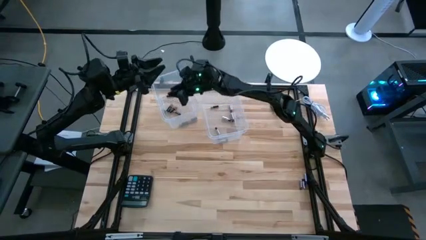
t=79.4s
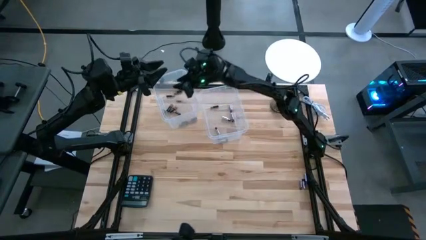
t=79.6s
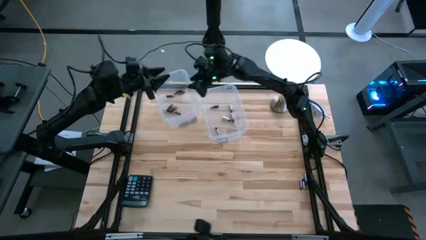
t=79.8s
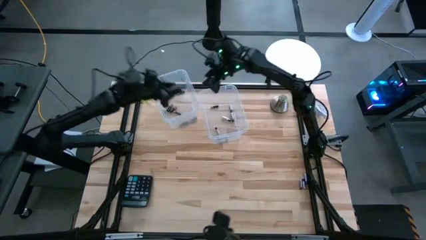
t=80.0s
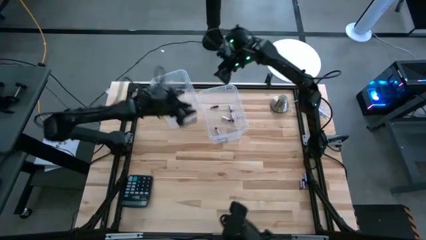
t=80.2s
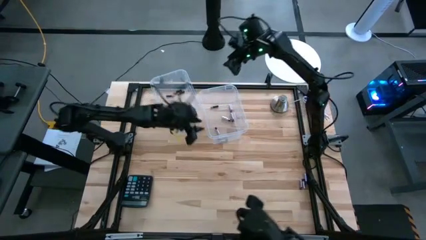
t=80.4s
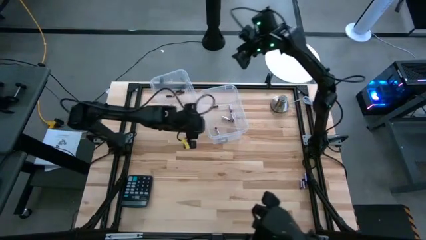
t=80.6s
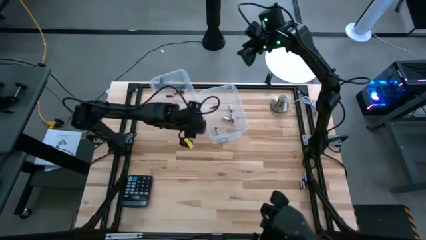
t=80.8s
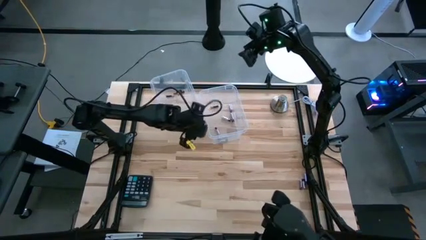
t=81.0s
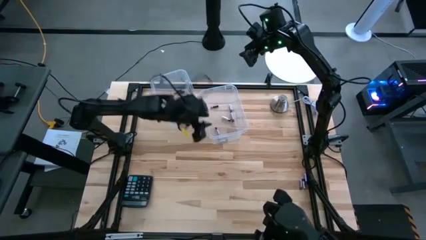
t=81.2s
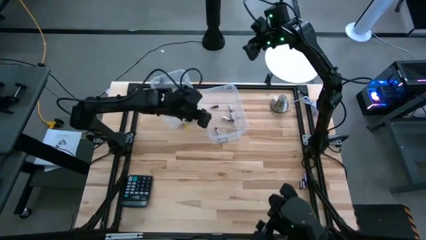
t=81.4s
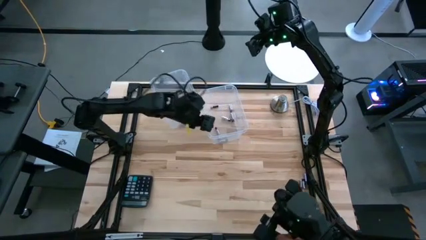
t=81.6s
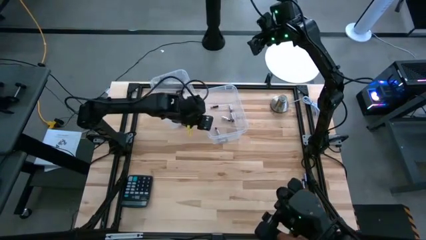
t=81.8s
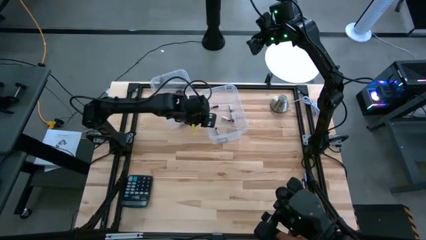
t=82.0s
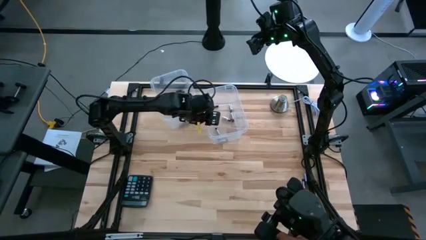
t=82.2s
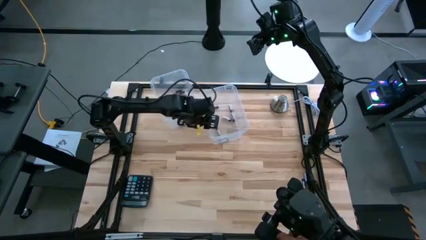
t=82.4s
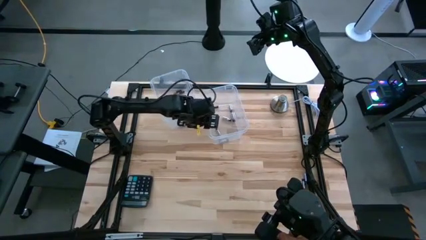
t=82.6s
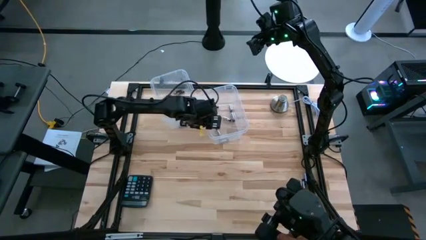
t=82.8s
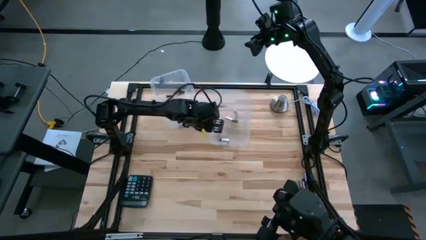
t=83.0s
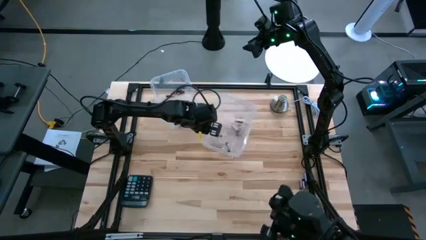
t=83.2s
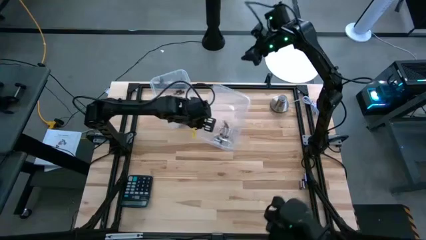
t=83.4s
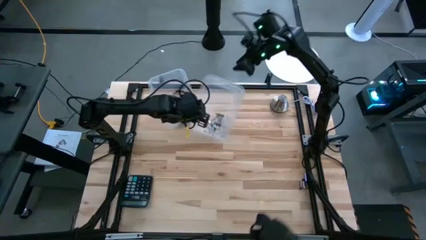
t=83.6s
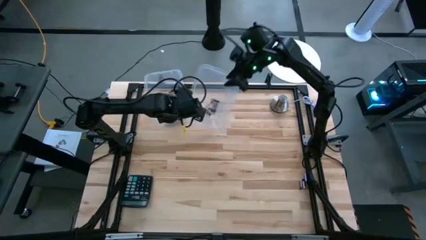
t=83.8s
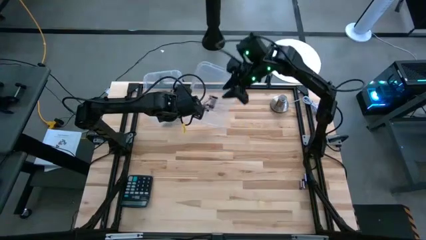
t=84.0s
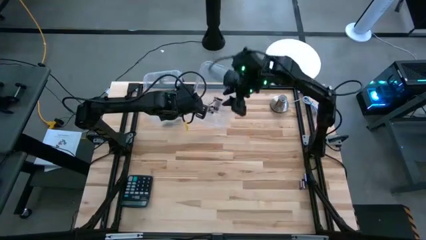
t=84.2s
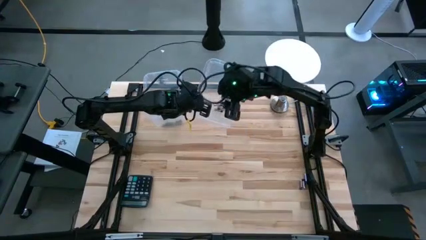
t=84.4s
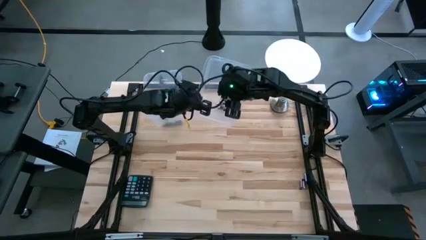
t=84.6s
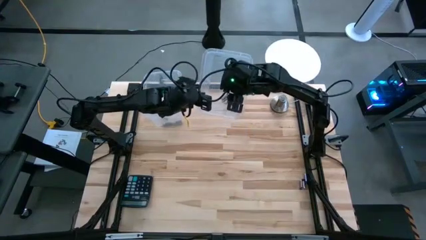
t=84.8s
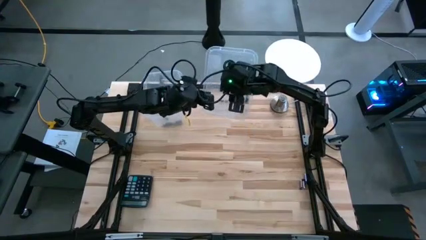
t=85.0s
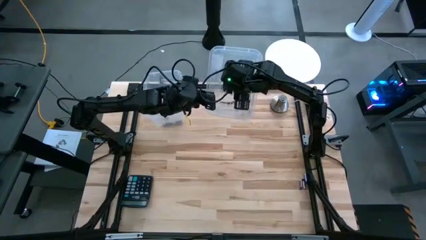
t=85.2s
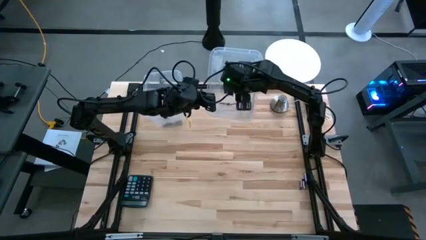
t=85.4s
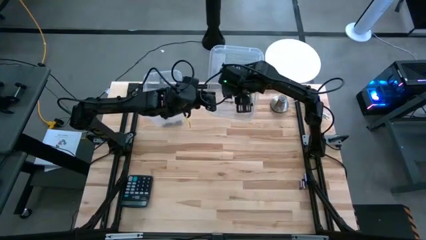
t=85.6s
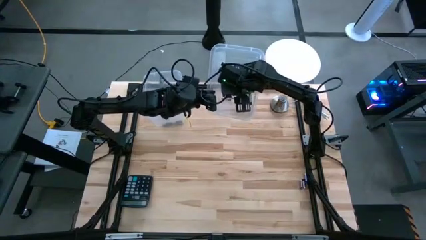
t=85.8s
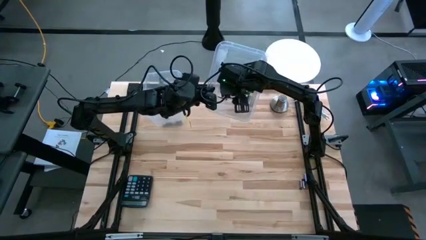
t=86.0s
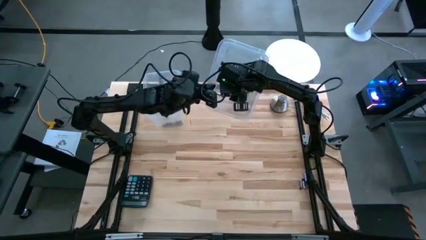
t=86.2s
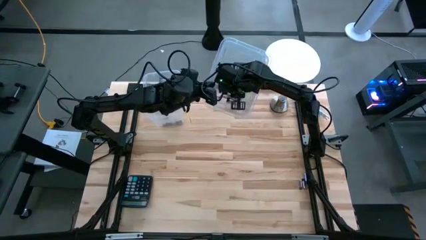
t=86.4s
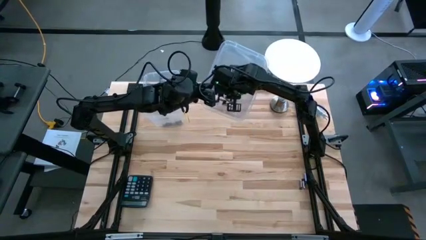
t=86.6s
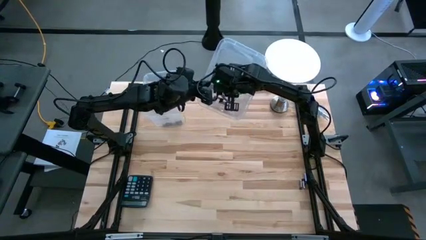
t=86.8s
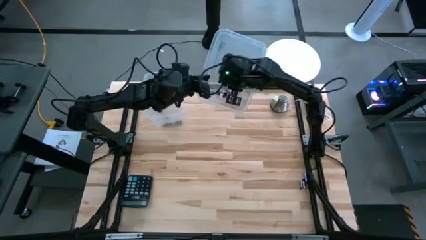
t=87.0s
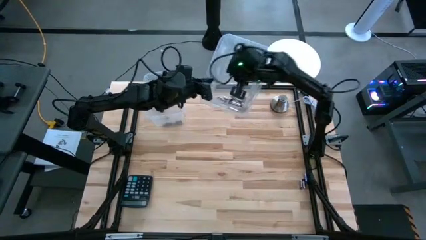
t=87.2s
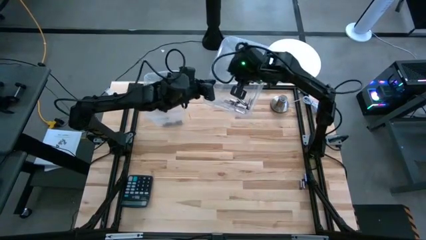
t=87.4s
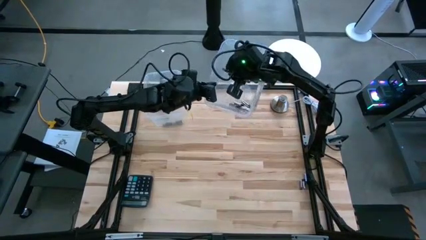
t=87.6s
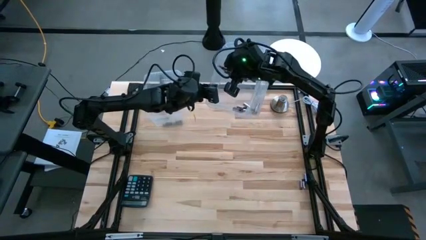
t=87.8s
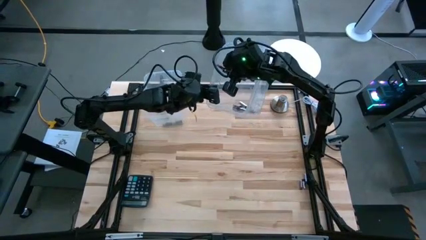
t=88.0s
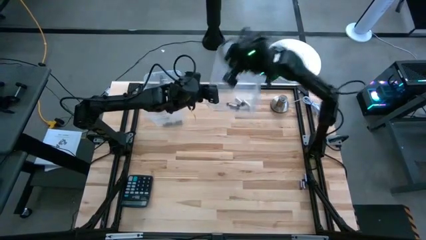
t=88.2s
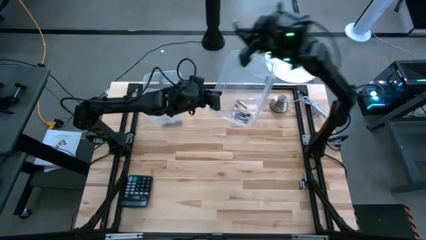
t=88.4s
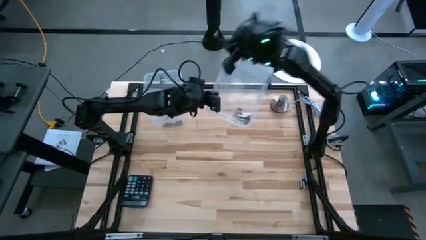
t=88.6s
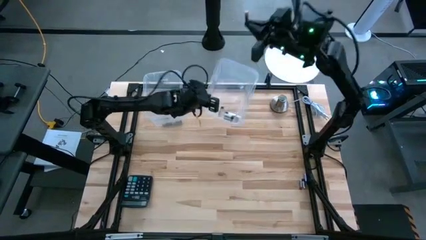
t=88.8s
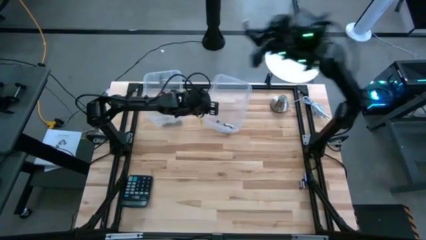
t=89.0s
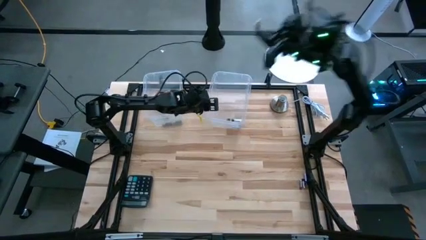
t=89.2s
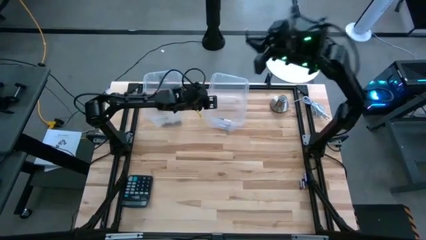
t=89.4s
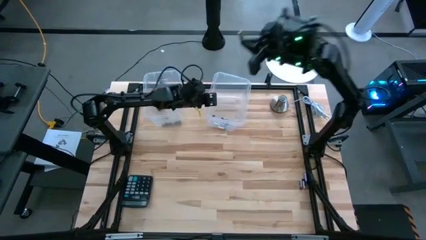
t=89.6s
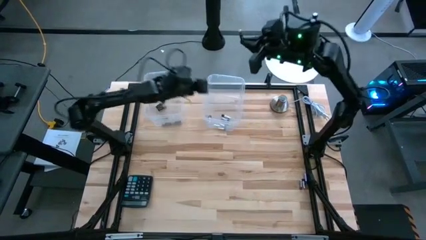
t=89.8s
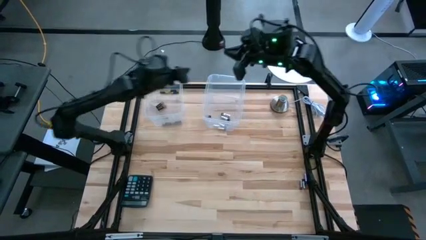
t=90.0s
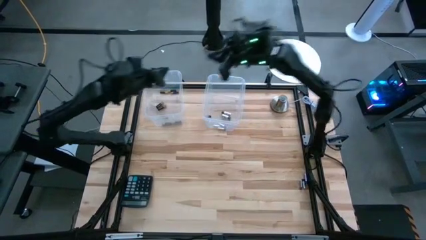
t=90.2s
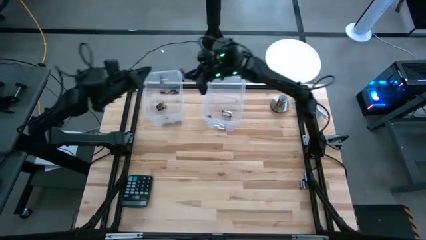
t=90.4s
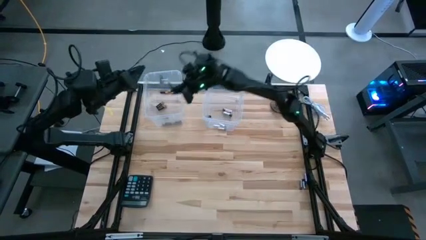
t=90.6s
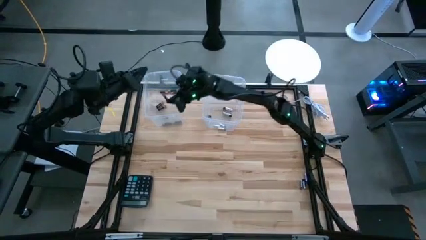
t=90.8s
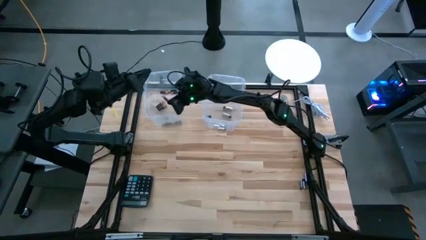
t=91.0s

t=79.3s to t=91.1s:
Task: Sort batteries
Put black battery into the left transparent bin

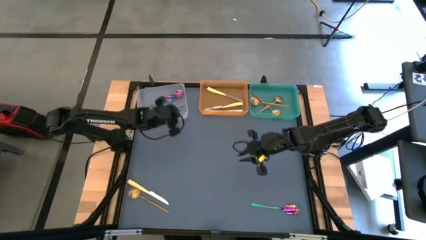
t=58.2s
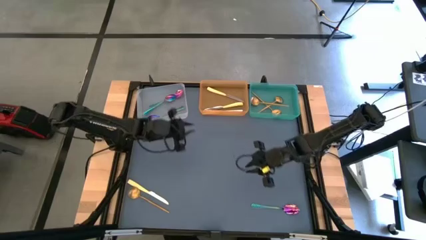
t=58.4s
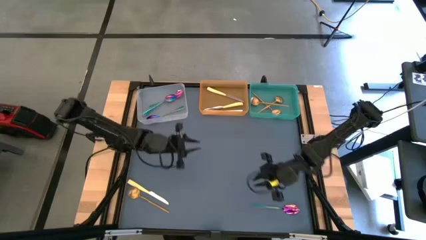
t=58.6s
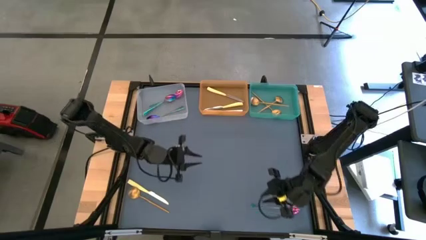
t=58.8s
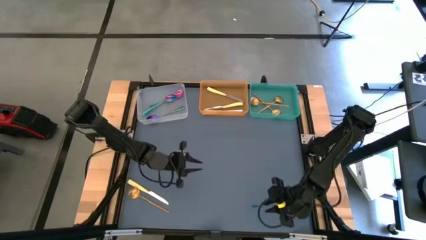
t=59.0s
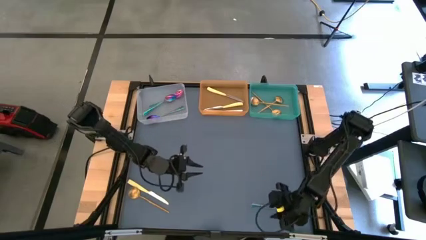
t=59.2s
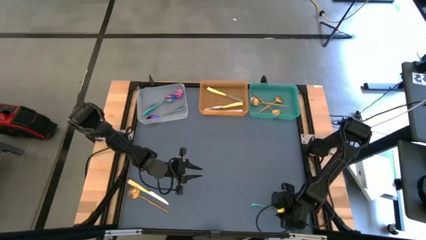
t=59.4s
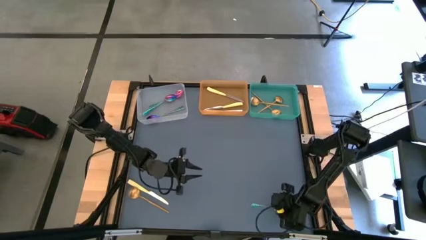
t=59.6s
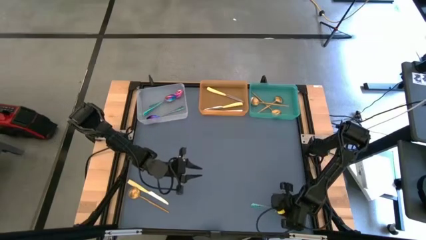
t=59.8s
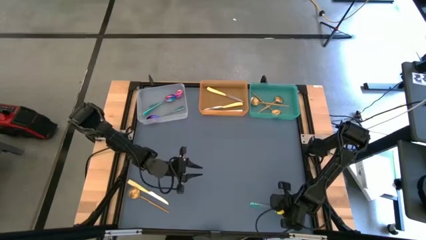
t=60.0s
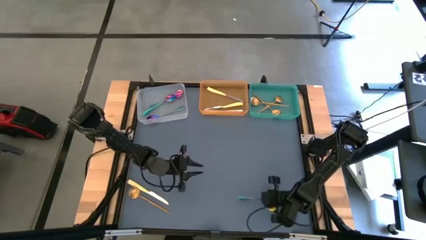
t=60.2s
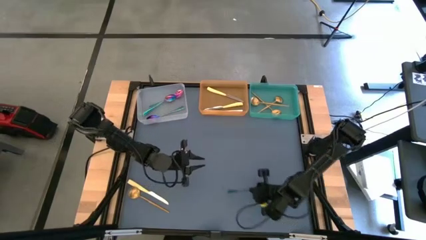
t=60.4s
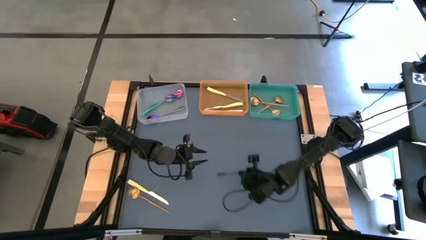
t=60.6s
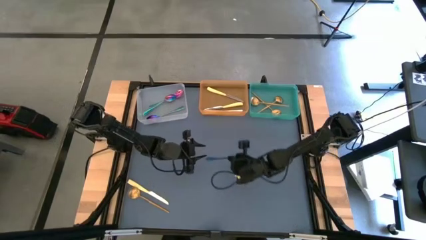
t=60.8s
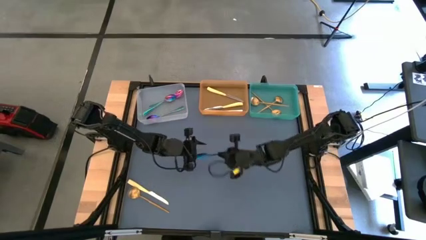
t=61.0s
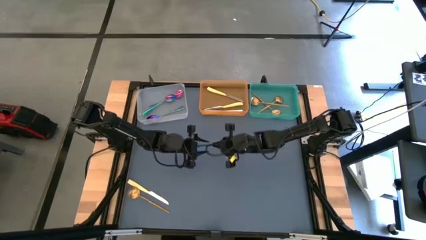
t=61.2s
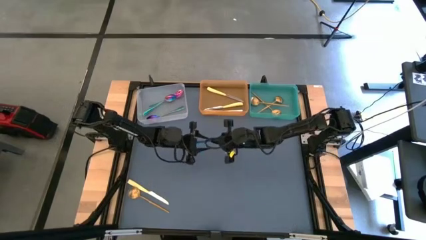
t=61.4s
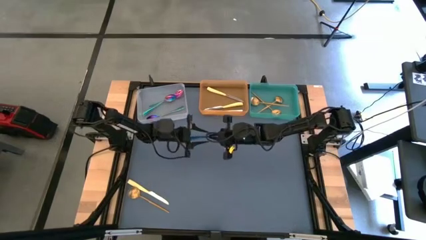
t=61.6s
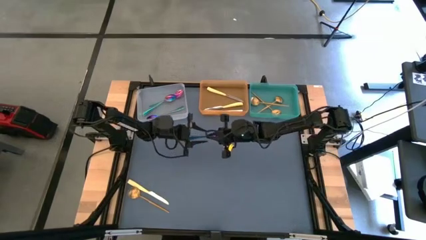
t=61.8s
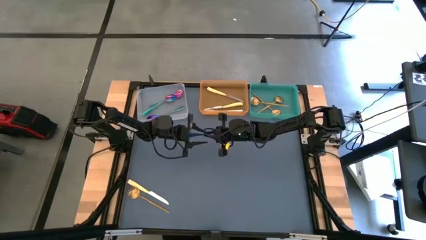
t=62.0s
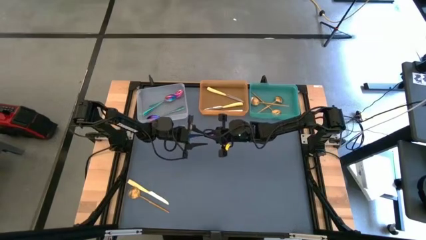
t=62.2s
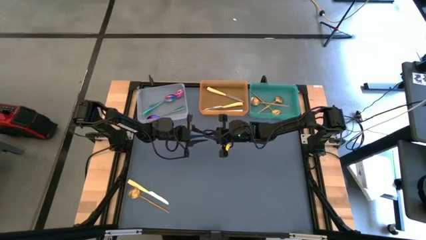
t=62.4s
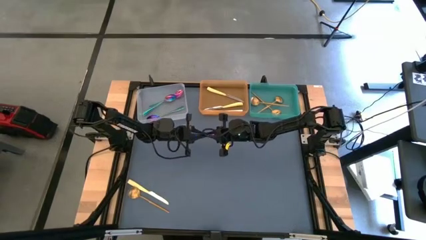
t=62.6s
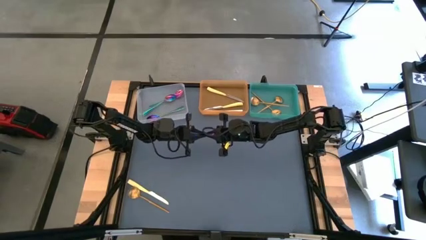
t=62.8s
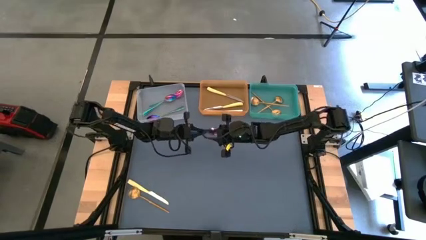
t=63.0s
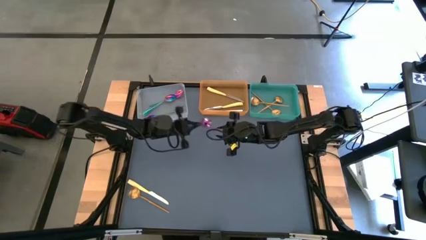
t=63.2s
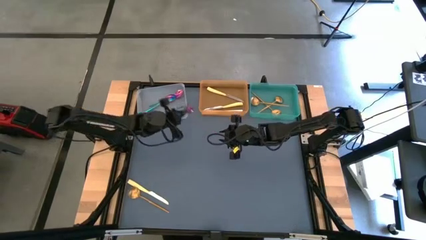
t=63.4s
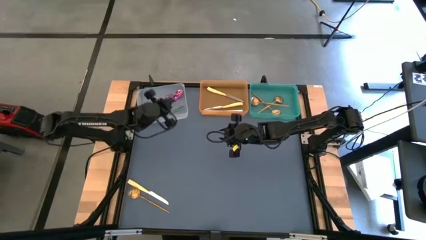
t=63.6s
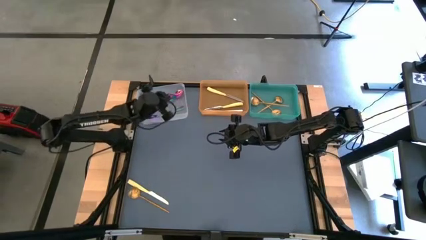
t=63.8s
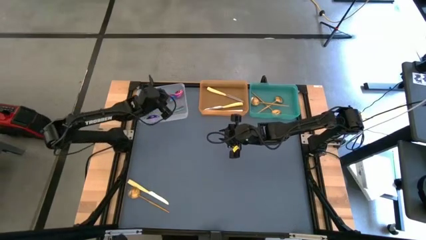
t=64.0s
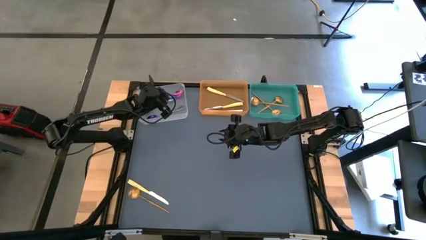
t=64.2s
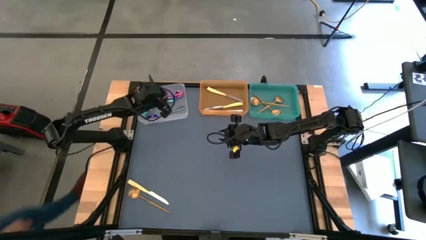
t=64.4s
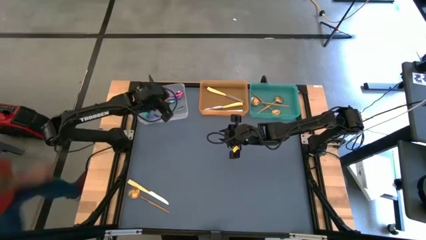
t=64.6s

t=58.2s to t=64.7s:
Task: Sort silverware by color (type)
Put the iridescent blue spoon into the transparent bin
